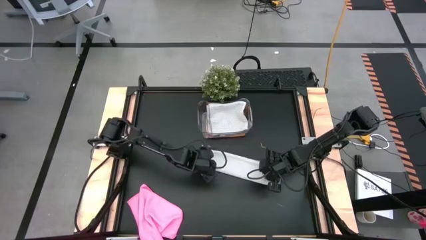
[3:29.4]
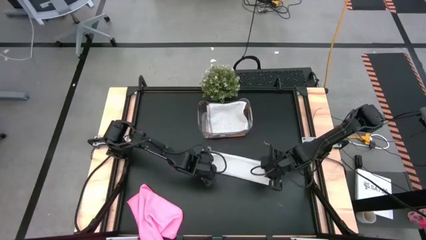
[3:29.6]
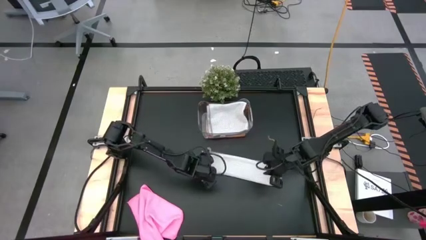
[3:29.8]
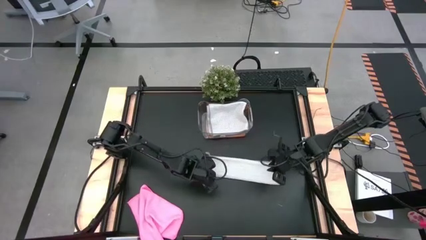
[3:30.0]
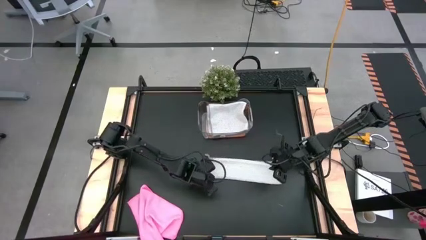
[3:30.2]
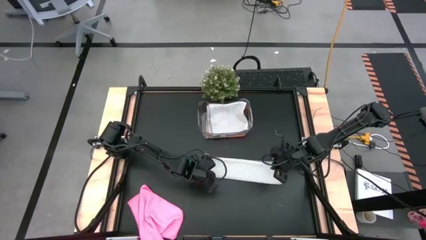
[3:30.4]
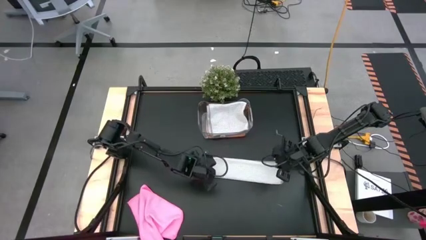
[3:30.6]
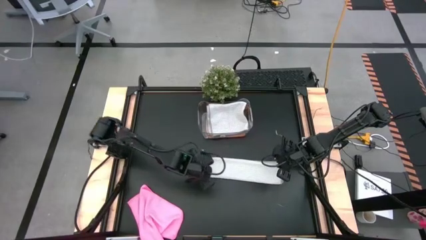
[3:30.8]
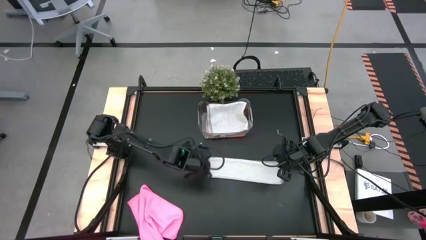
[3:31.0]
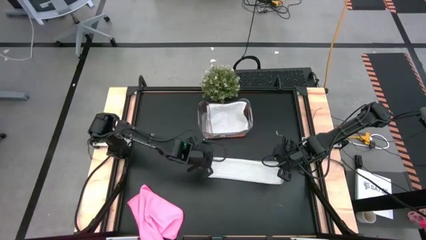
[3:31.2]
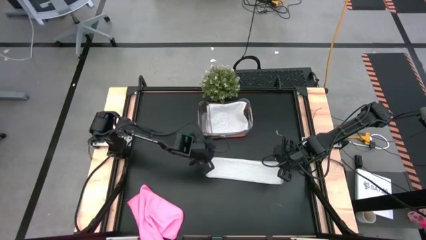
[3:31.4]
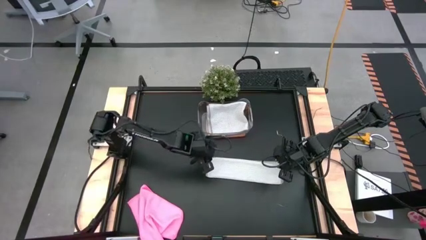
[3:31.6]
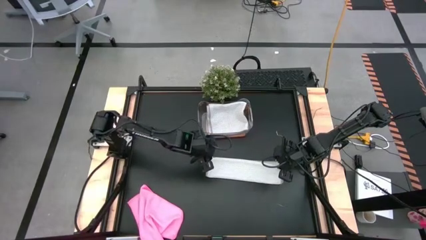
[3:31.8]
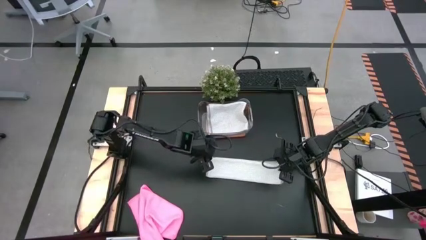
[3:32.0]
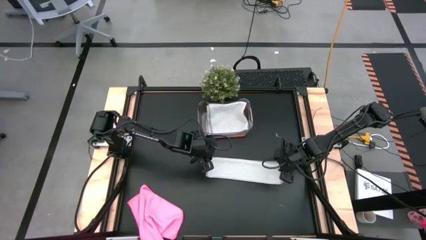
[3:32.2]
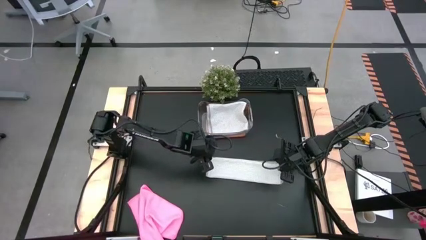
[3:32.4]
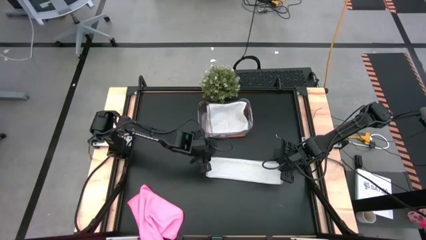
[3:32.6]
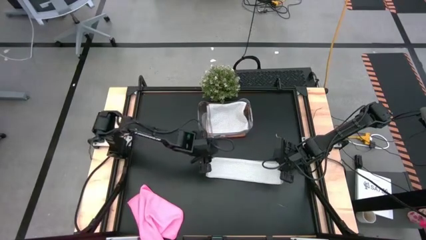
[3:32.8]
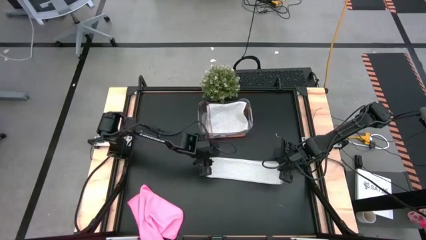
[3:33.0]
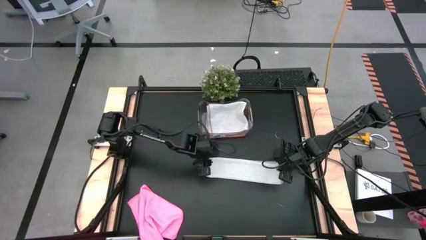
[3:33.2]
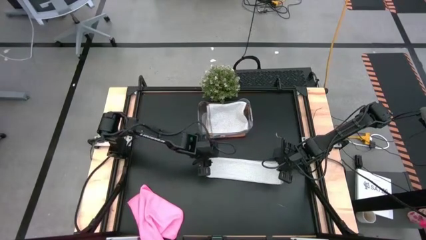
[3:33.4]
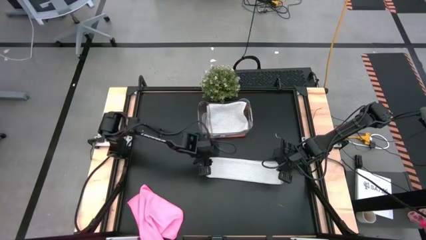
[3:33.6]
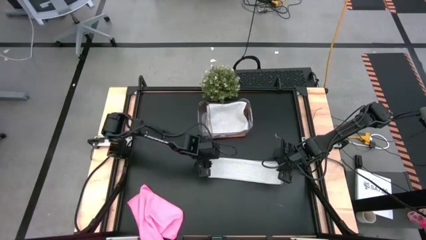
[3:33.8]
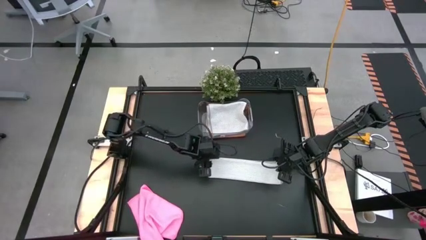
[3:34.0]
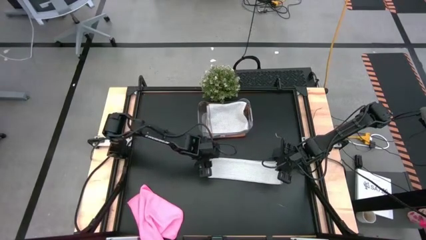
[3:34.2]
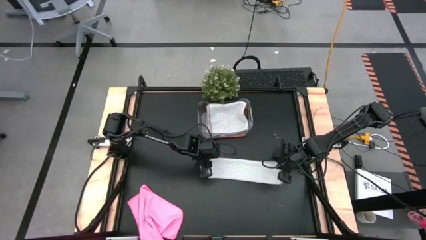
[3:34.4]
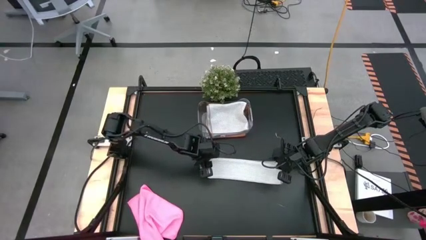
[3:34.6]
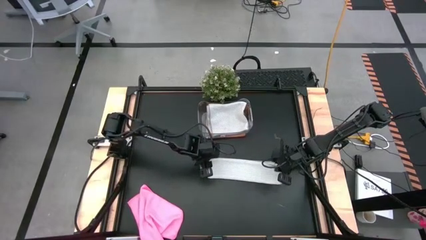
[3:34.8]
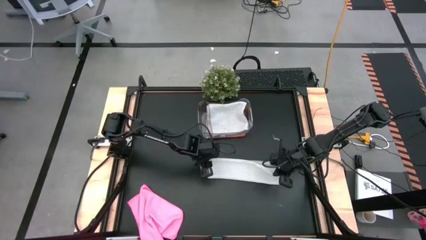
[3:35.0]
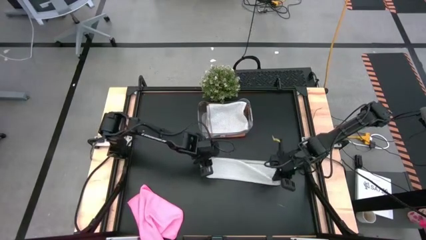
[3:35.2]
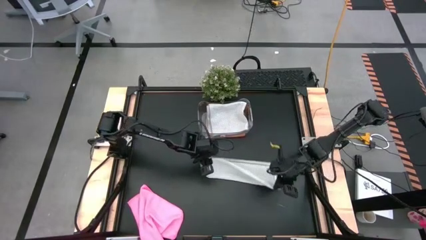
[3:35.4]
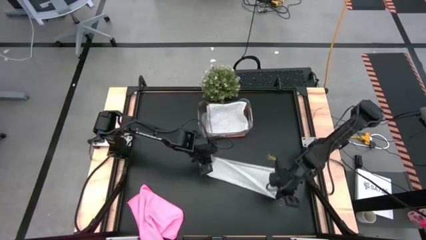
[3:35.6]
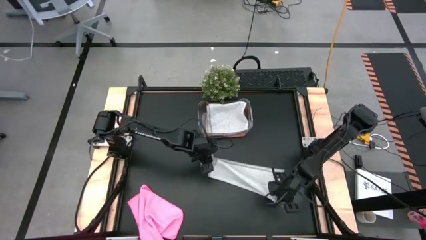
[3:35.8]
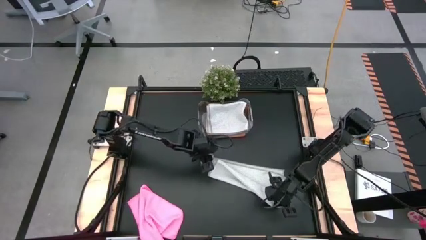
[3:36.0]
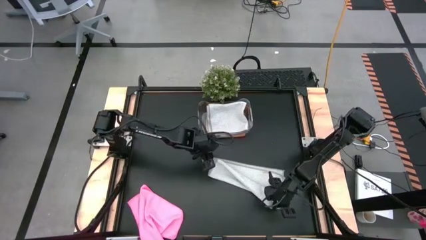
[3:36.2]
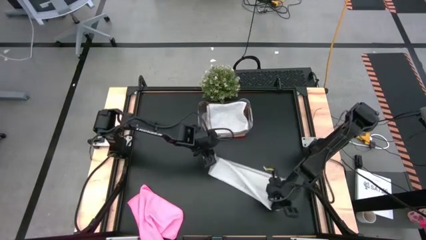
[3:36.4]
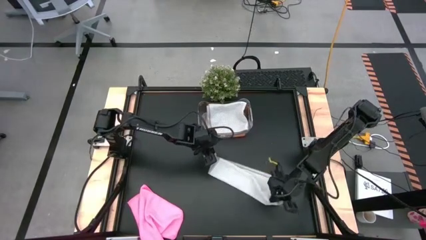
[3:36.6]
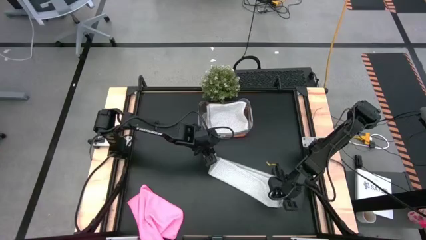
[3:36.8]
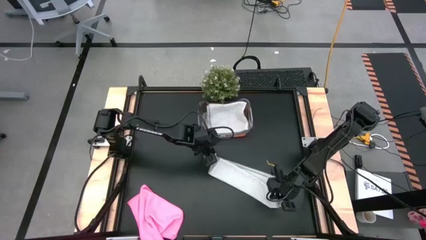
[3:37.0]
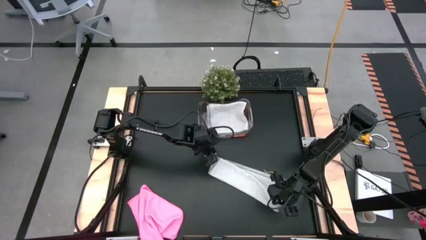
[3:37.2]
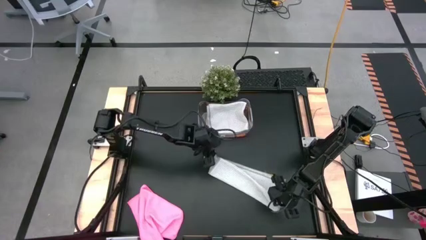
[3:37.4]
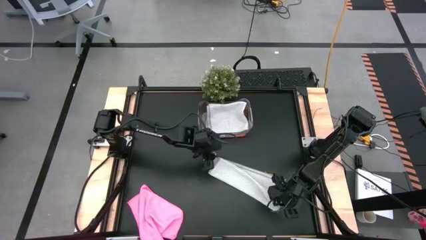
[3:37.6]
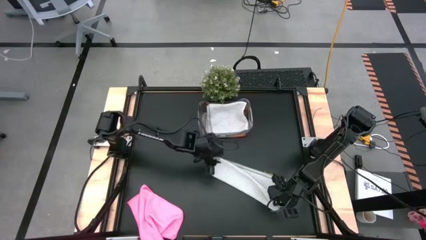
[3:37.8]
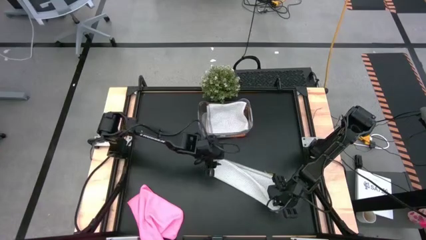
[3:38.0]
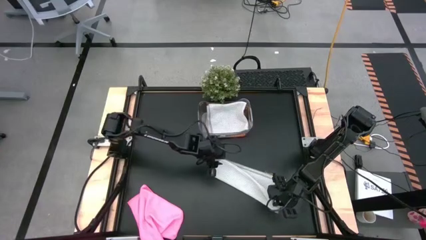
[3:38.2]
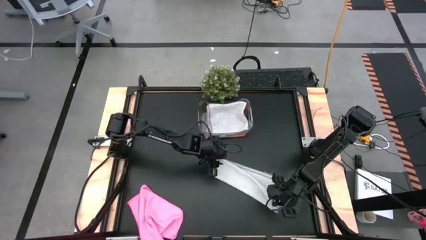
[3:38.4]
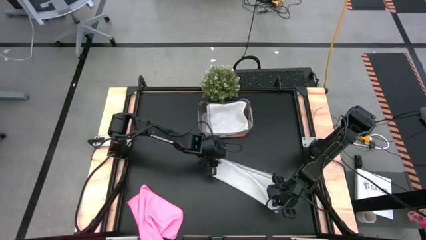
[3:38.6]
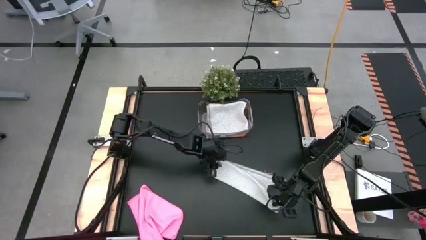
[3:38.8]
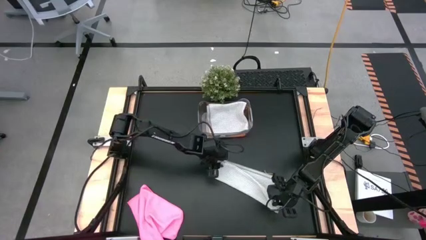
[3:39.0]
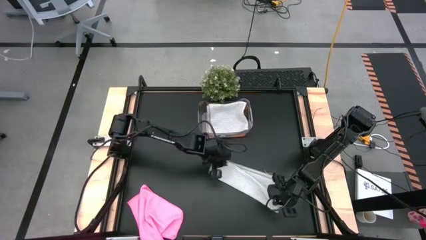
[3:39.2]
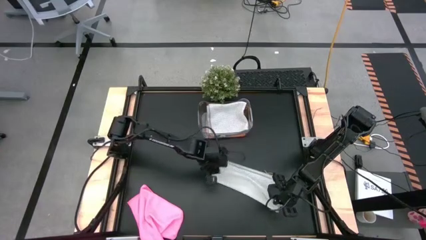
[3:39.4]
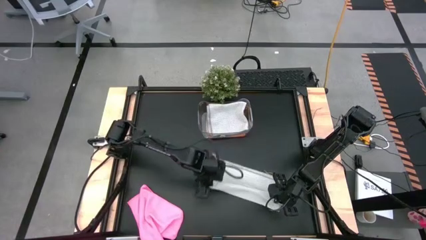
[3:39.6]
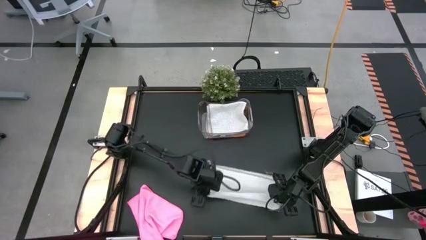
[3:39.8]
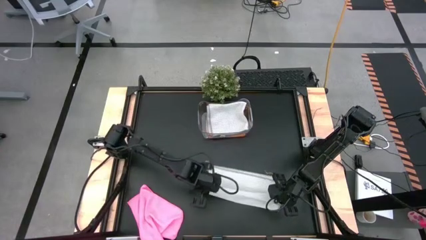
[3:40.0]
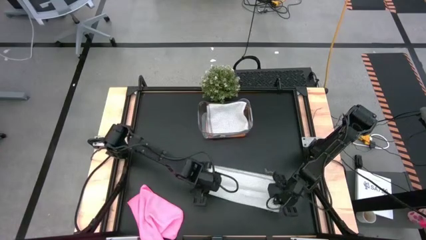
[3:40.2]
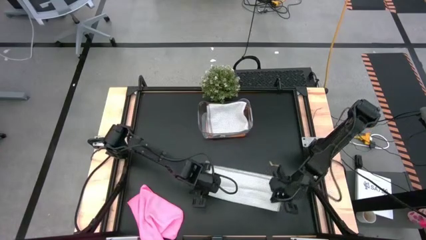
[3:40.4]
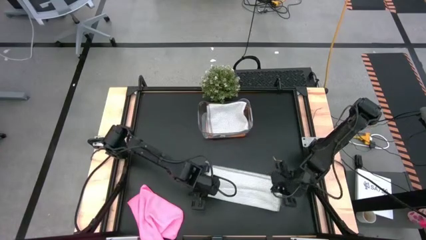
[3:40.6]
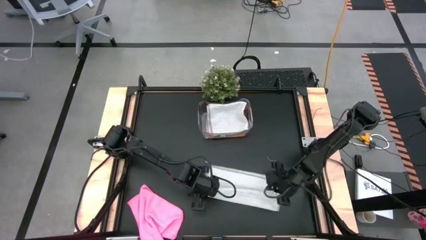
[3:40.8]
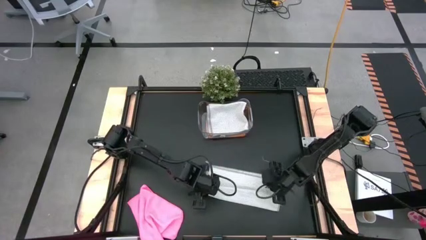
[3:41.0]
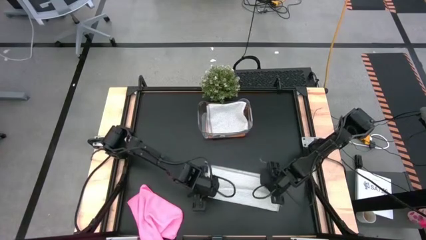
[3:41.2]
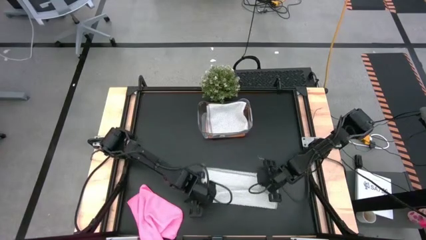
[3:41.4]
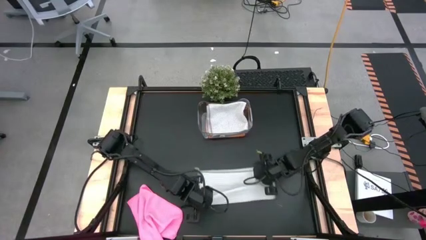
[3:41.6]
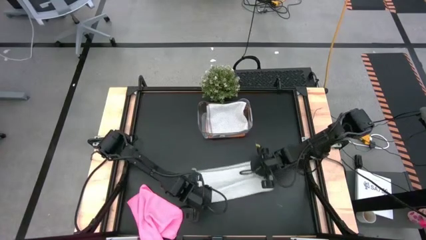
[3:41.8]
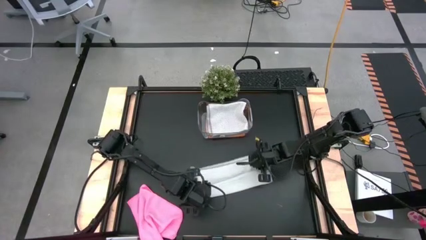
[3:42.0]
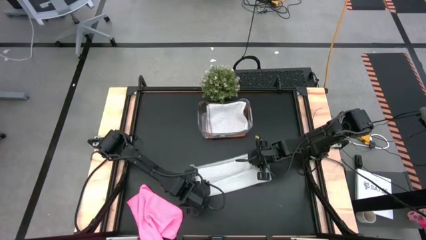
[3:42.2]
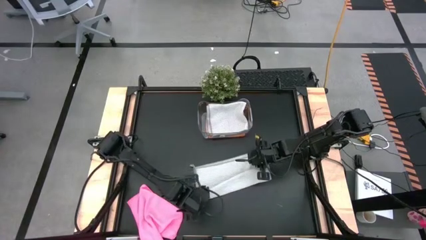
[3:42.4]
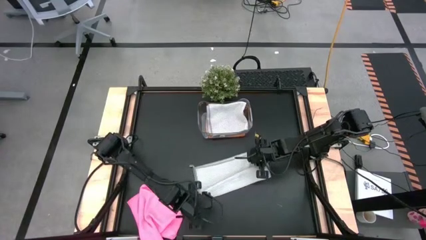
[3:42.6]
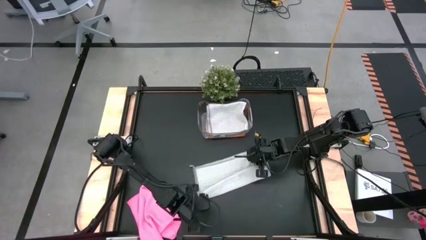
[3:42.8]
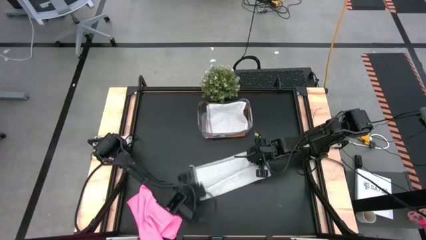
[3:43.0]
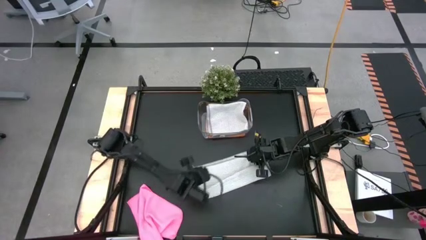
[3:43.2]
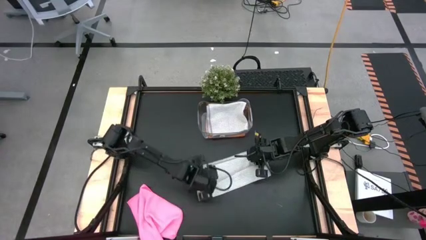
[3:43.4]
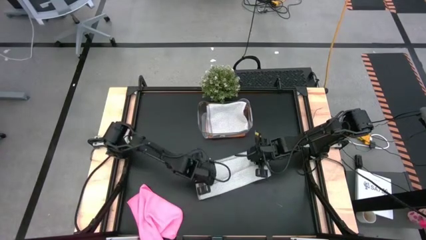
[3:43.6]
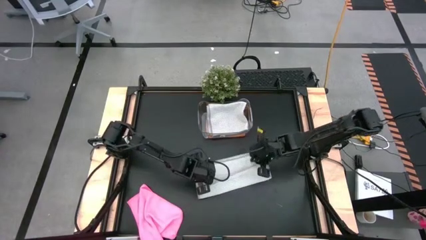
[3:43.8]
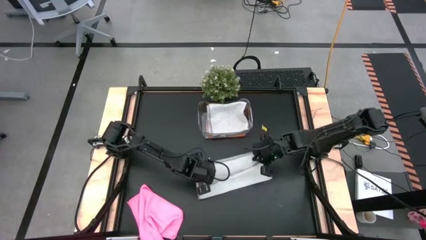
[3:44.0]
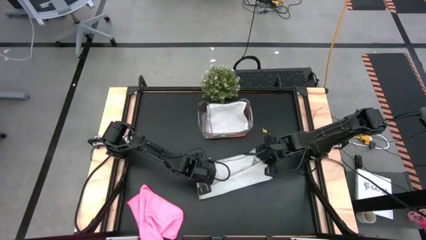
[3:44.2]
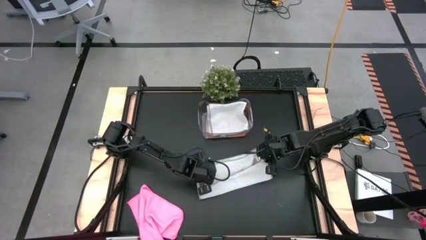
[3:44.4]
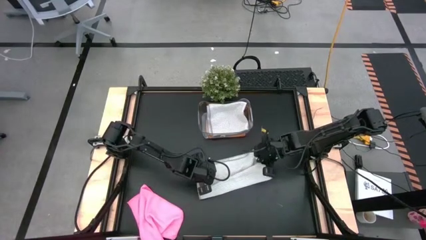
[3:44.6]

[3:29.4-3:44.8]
Task: Fold microfiber towels
Fold the gray microfiber towel on the table
